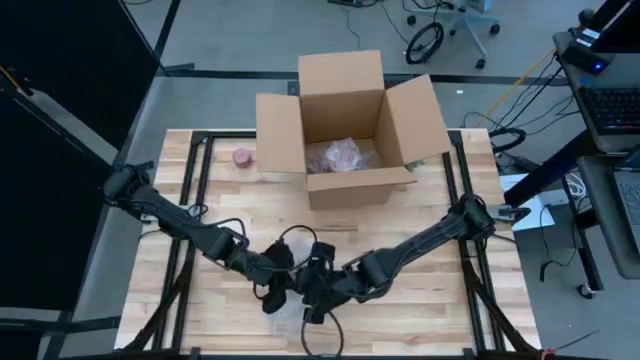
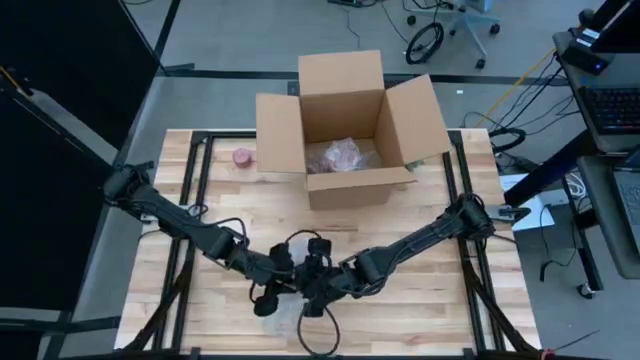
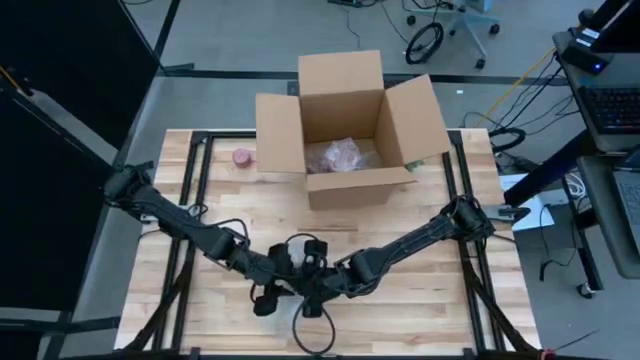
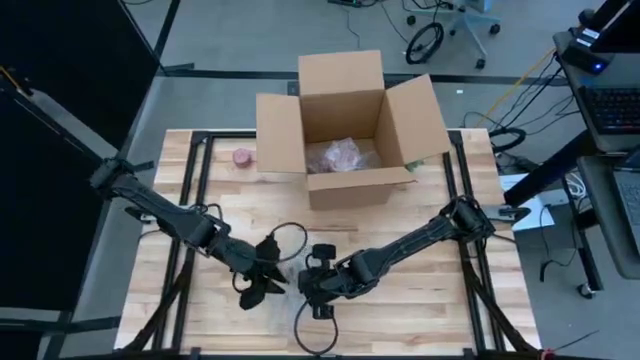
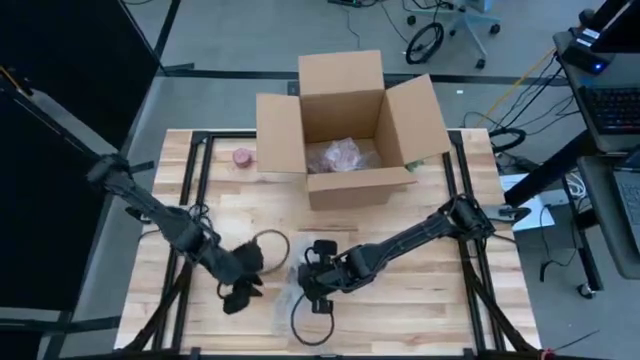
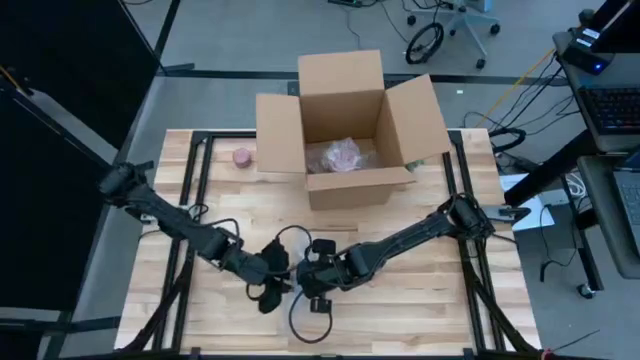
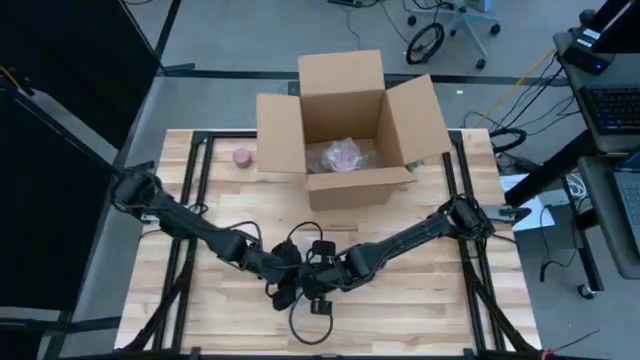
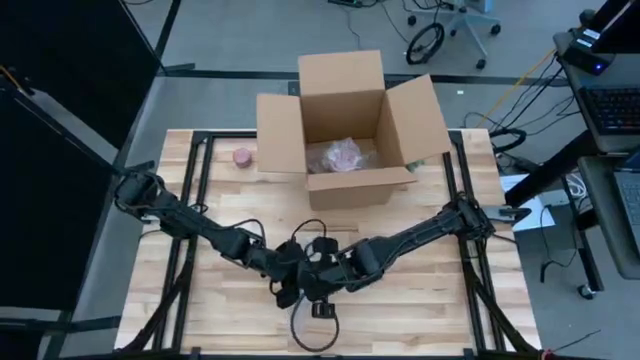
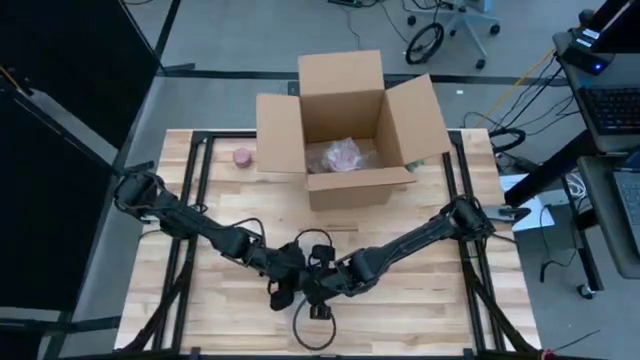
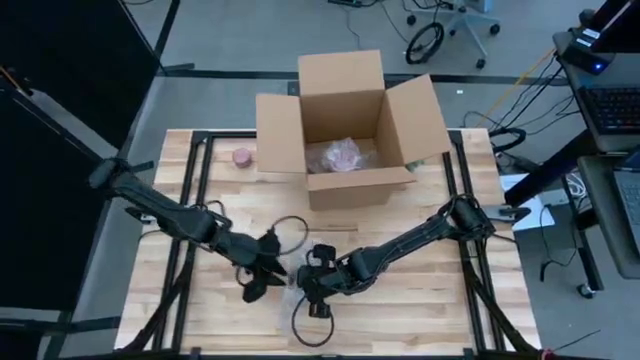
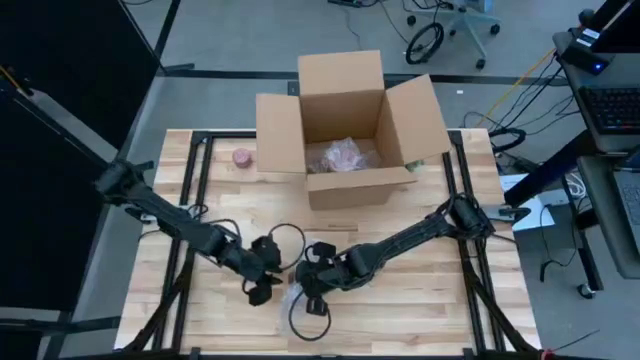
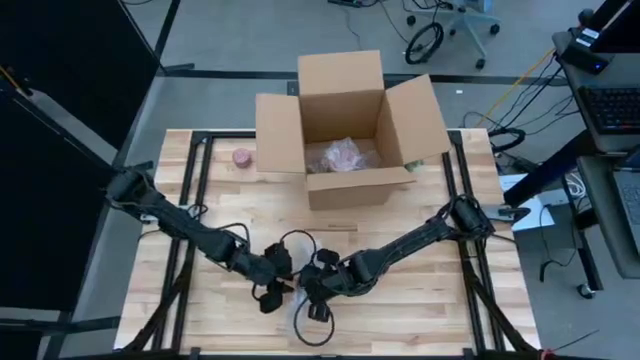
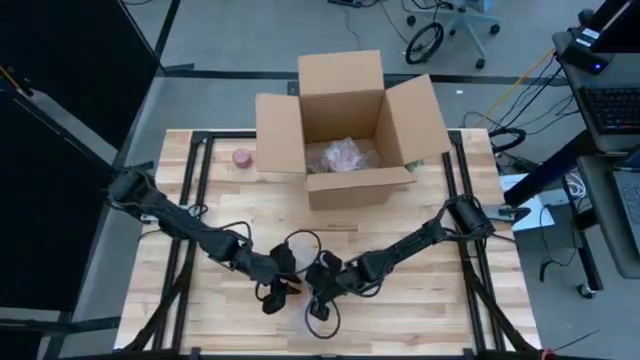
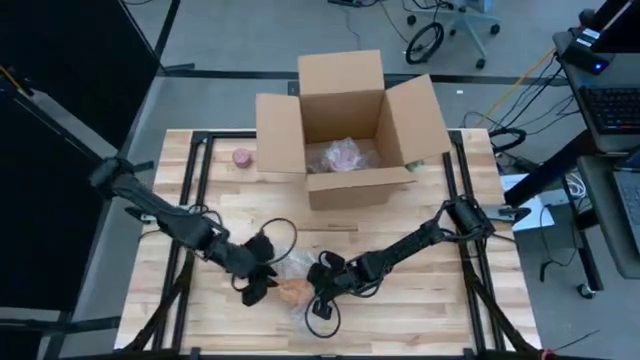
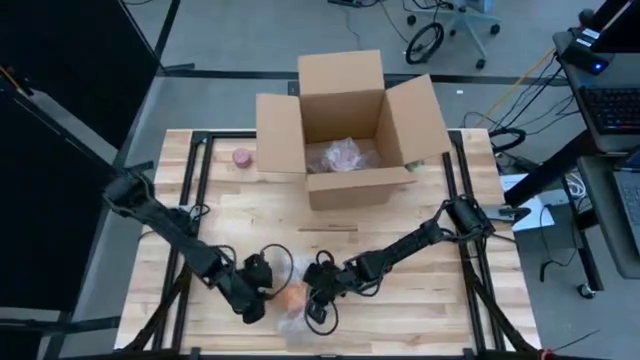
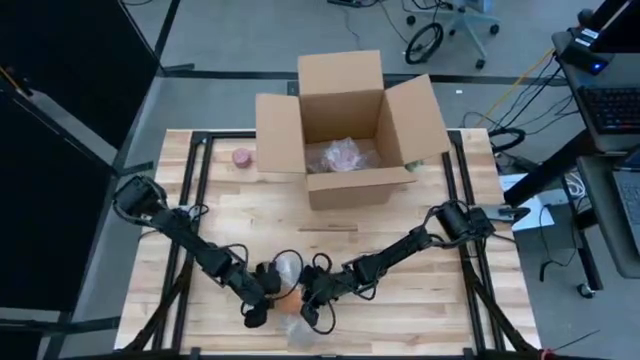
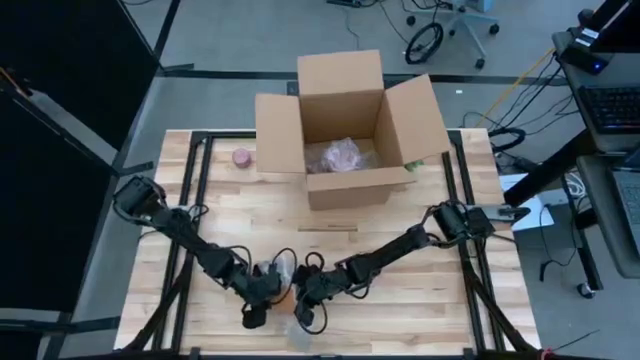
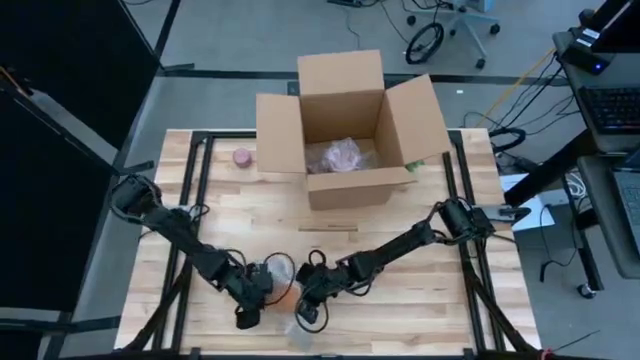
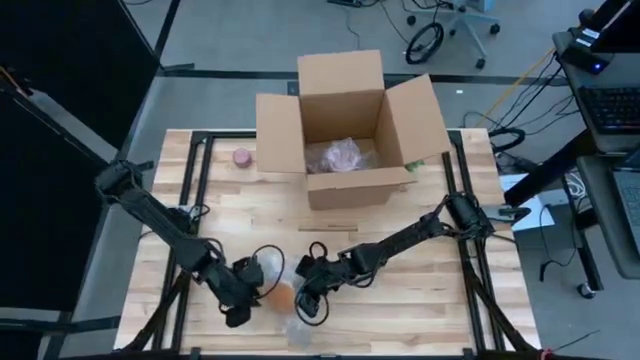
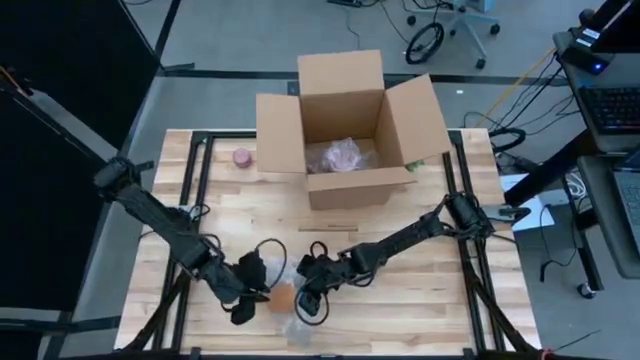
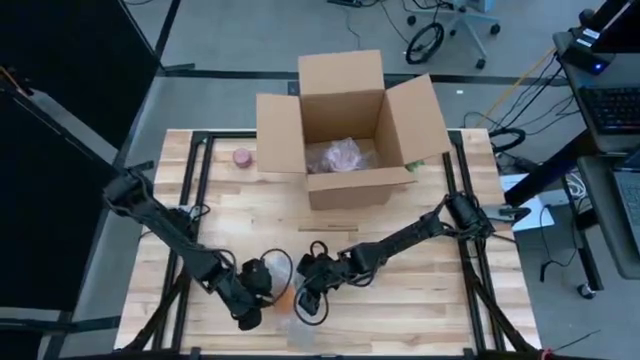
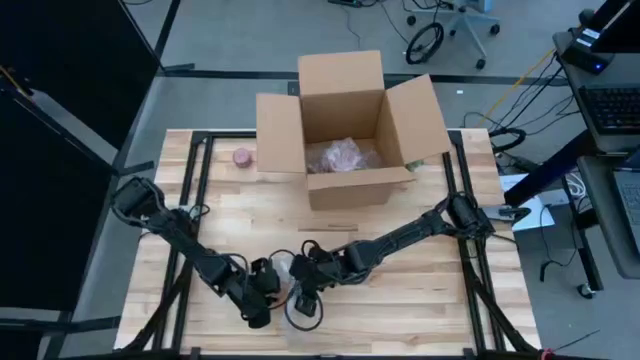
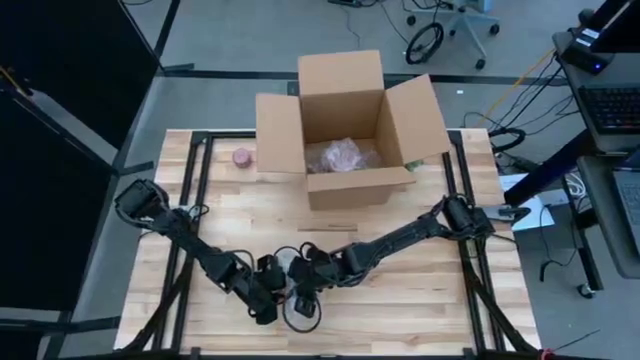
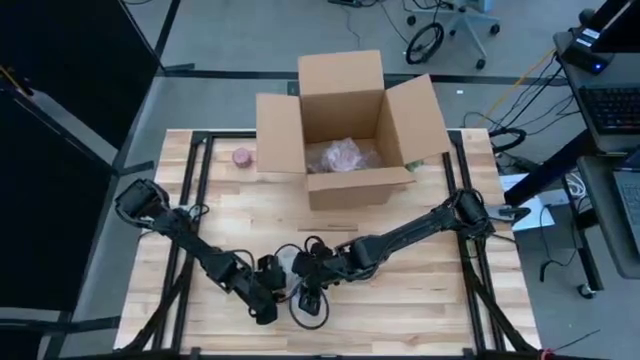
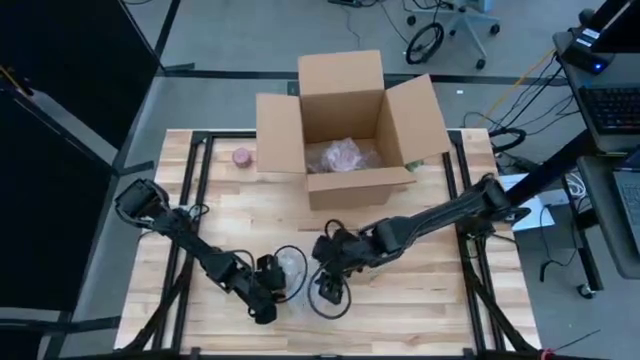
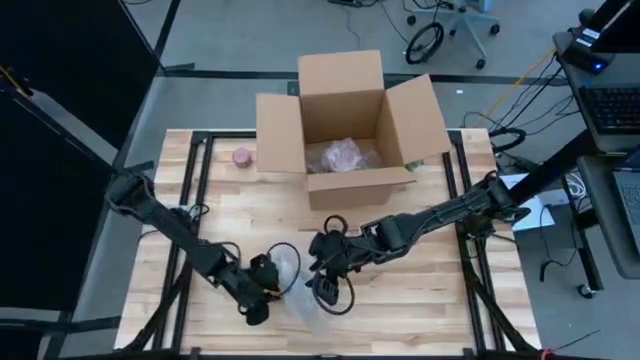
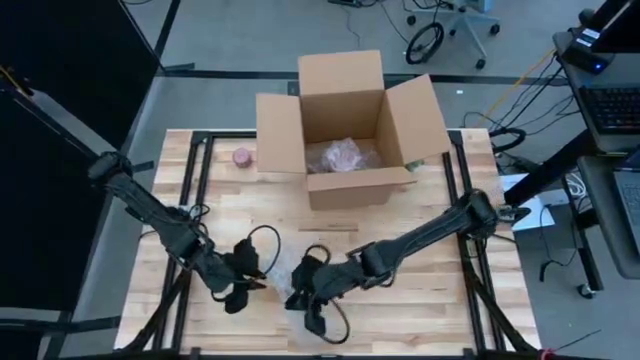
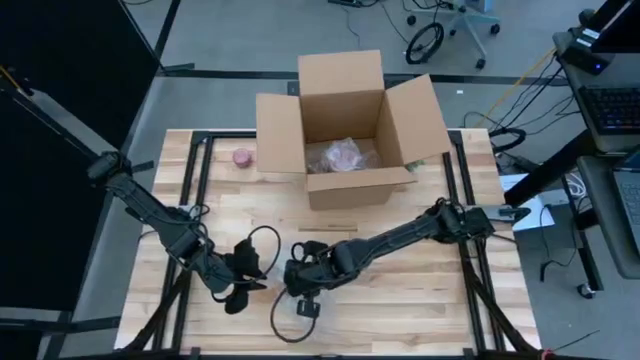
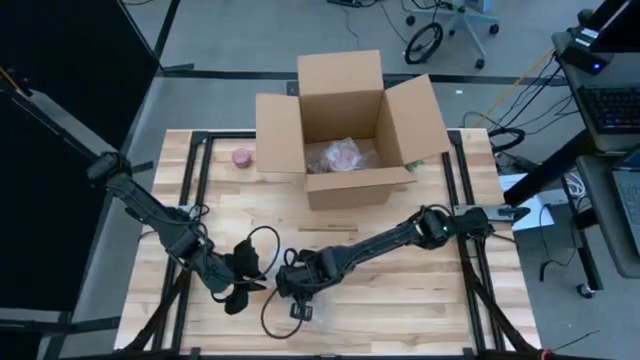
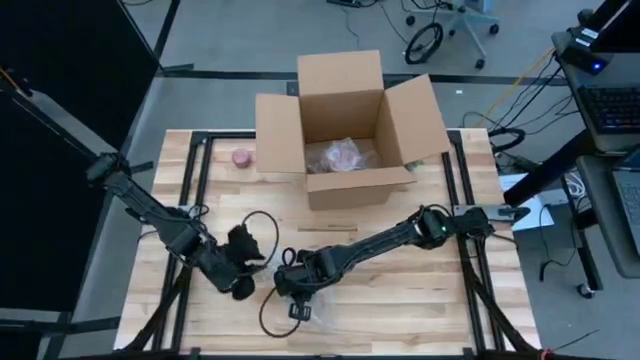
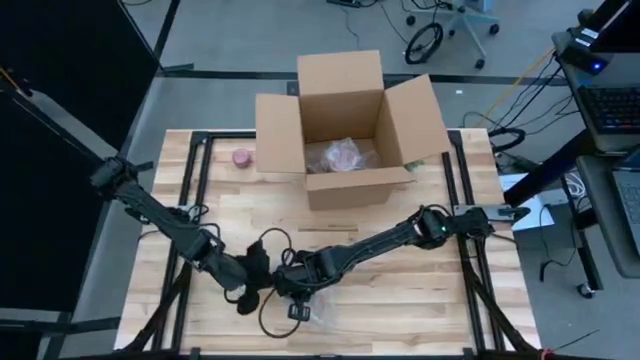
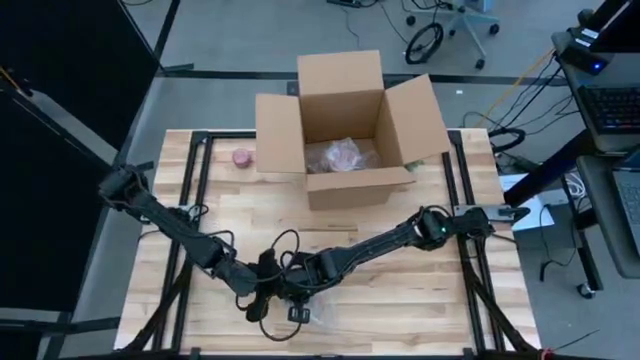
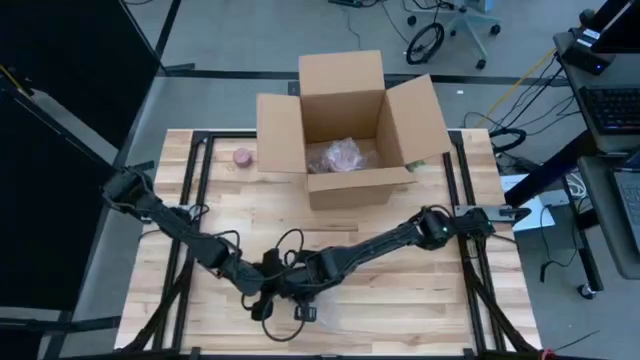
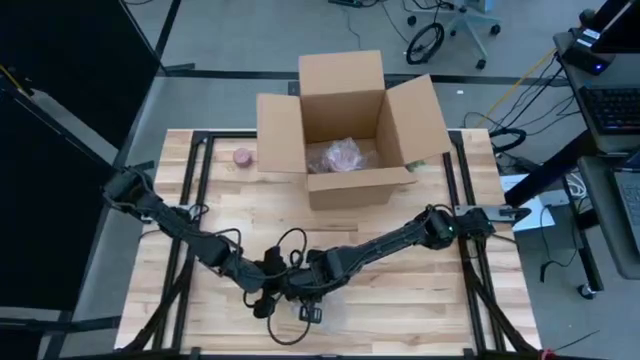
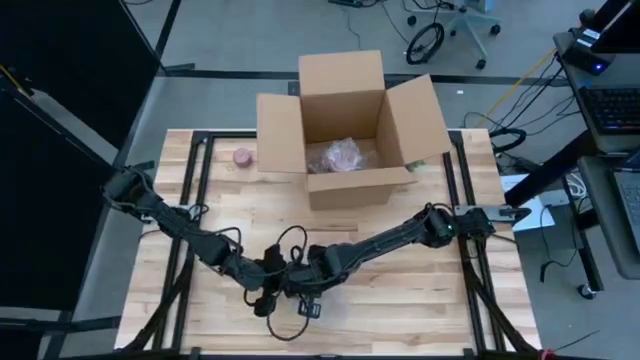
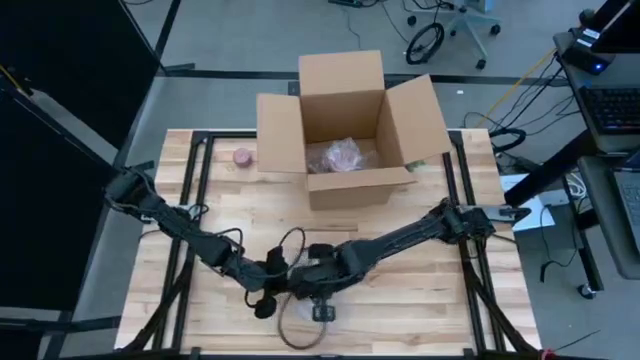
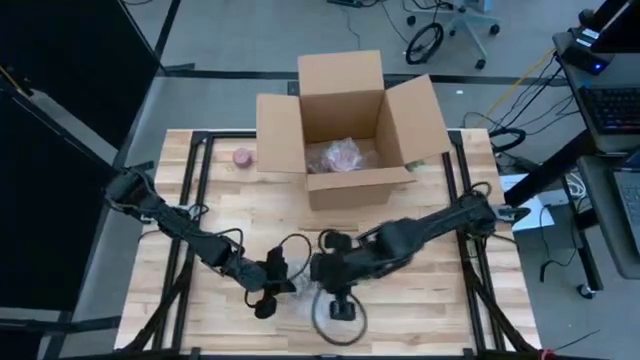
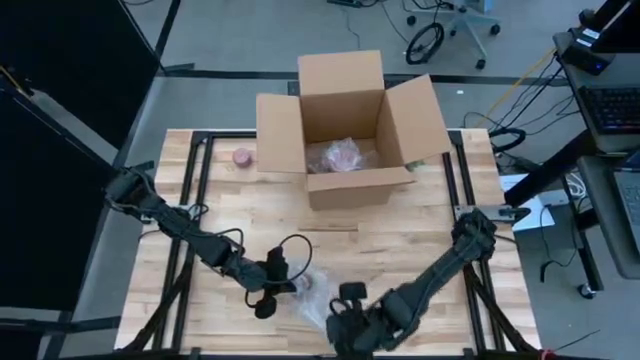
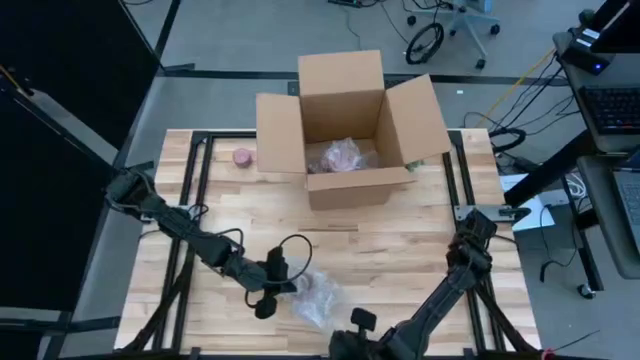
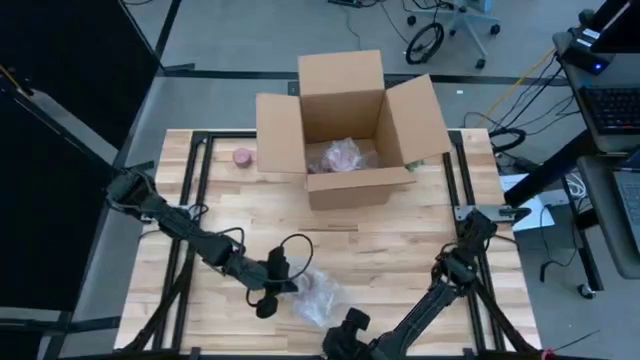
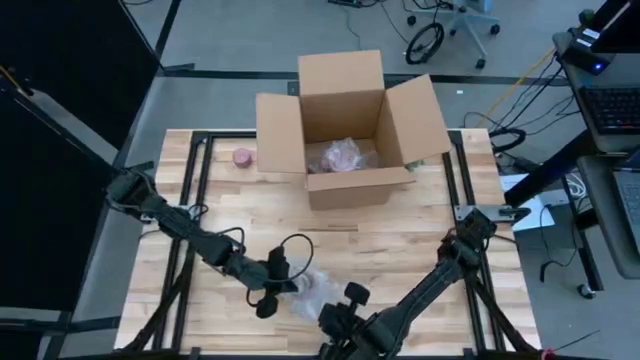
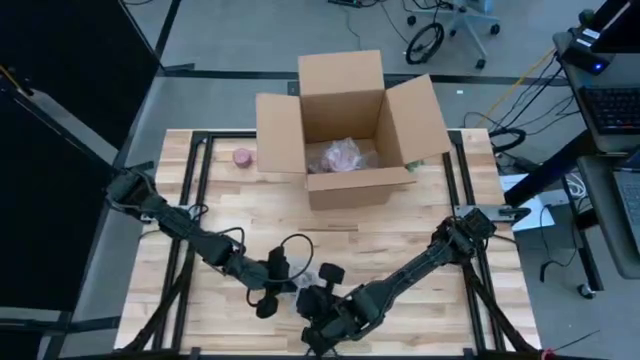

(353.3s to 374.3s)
Task: wrap mug
Wrap the orange cup with the bubble wrap
